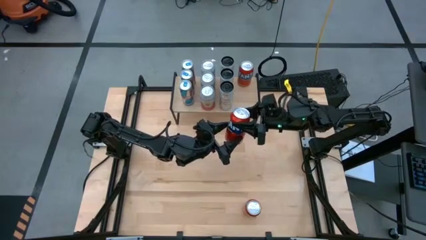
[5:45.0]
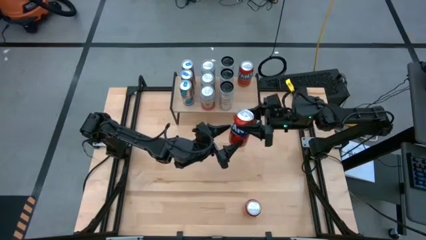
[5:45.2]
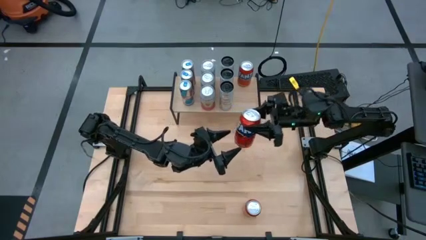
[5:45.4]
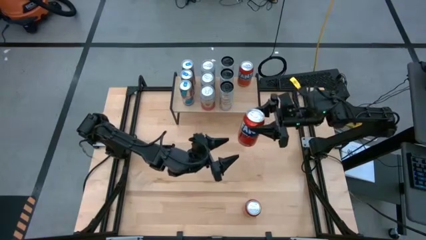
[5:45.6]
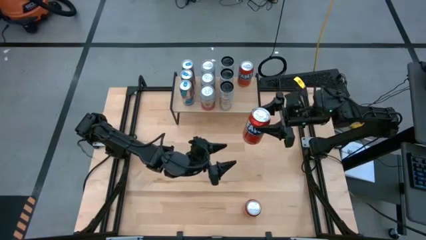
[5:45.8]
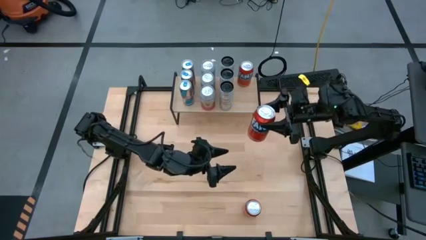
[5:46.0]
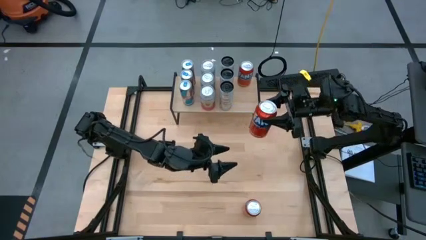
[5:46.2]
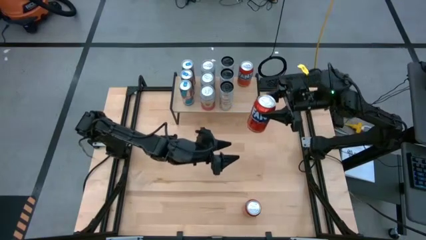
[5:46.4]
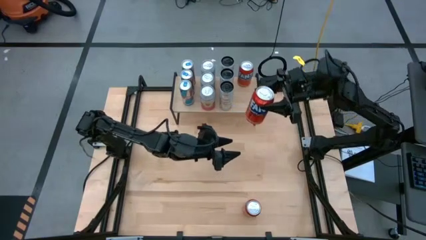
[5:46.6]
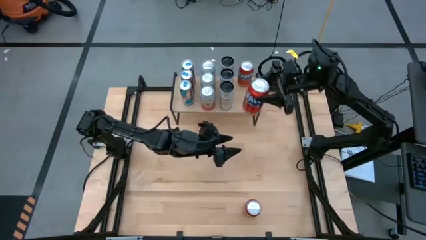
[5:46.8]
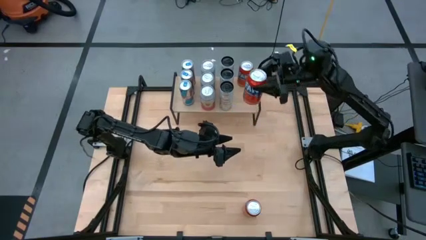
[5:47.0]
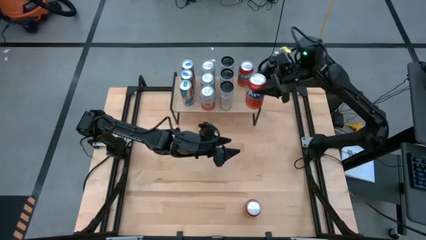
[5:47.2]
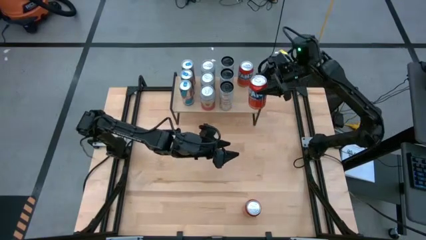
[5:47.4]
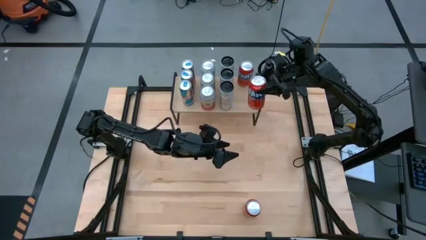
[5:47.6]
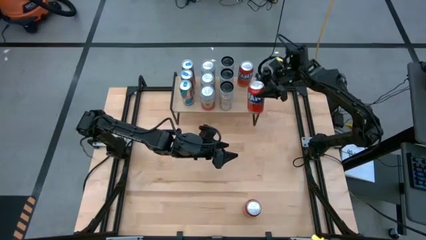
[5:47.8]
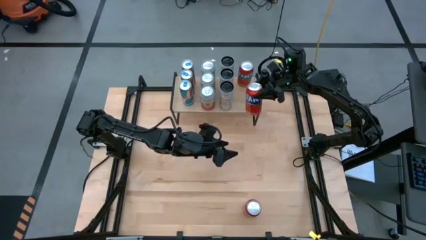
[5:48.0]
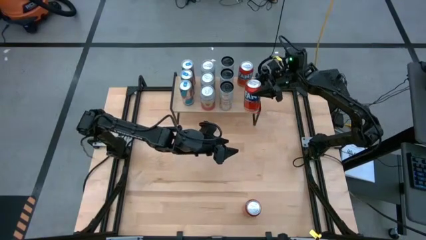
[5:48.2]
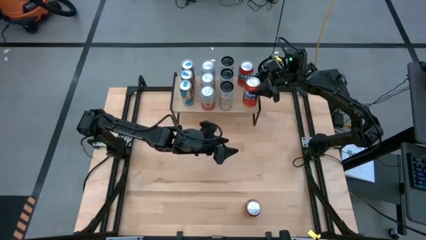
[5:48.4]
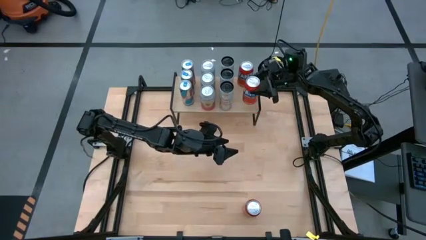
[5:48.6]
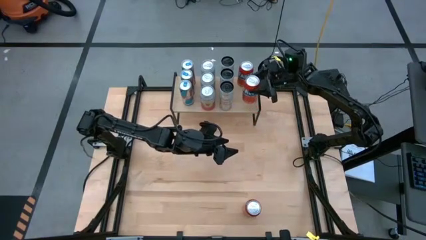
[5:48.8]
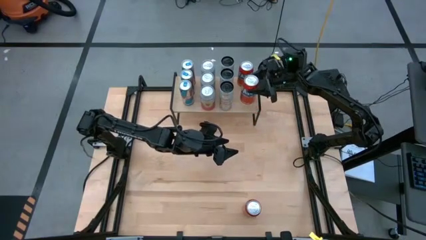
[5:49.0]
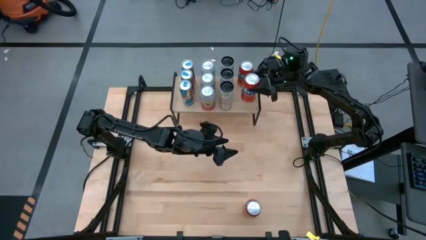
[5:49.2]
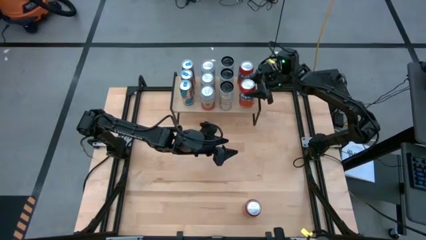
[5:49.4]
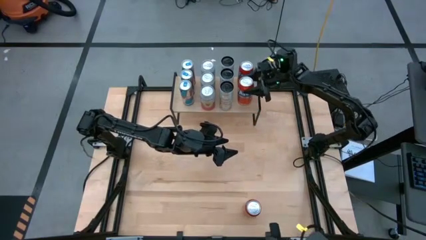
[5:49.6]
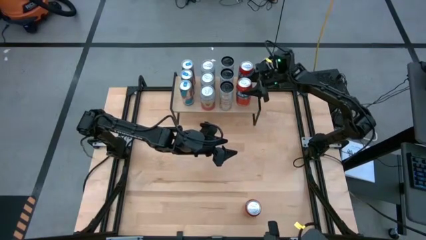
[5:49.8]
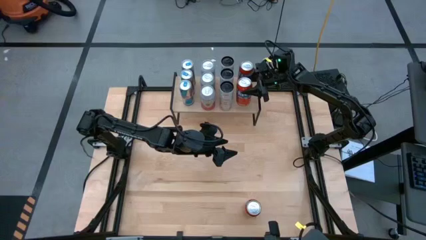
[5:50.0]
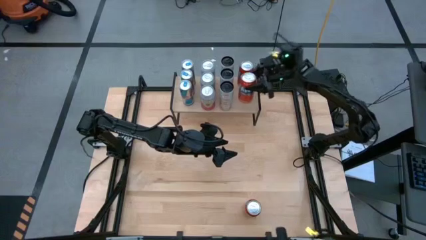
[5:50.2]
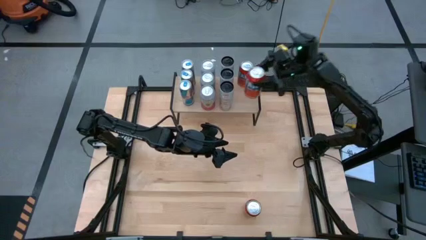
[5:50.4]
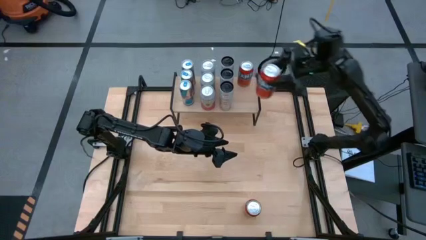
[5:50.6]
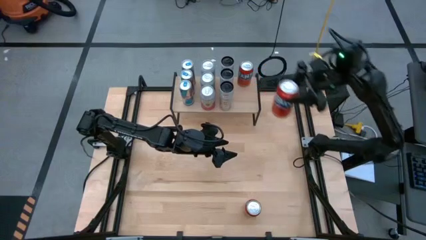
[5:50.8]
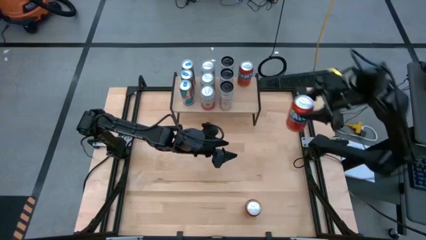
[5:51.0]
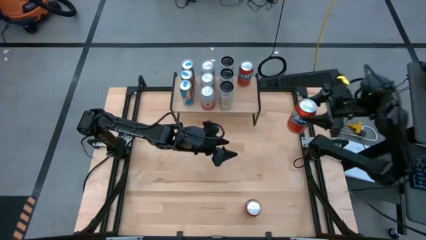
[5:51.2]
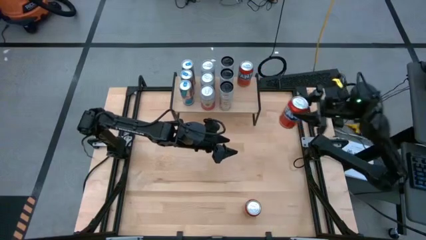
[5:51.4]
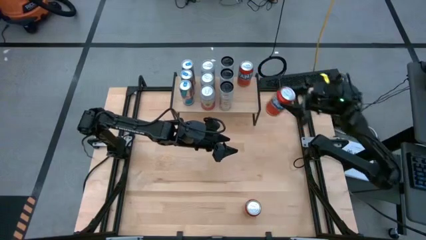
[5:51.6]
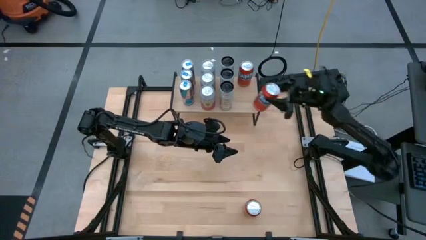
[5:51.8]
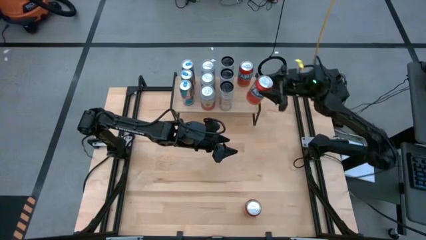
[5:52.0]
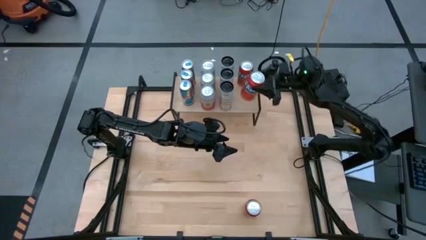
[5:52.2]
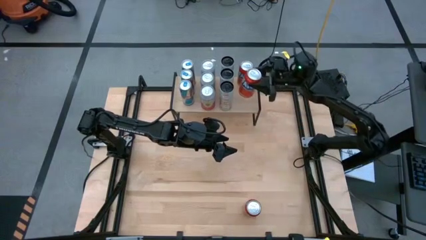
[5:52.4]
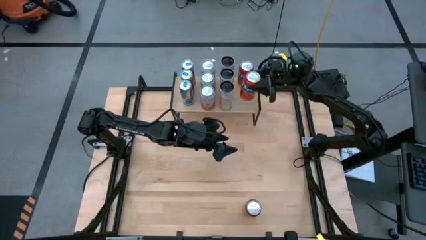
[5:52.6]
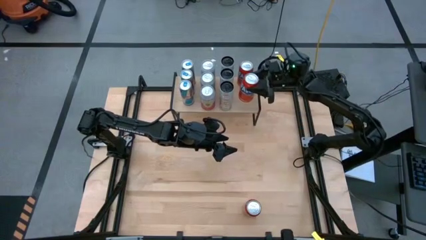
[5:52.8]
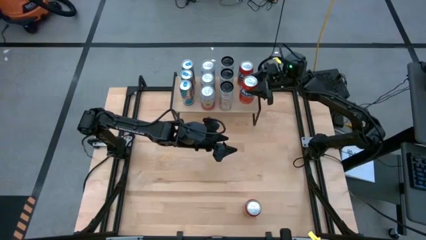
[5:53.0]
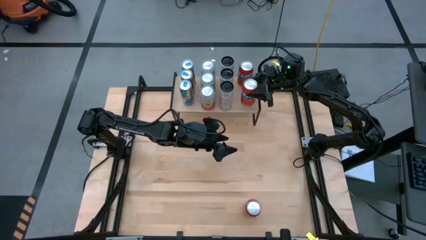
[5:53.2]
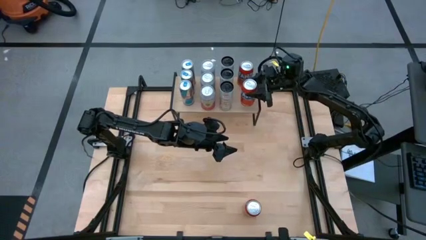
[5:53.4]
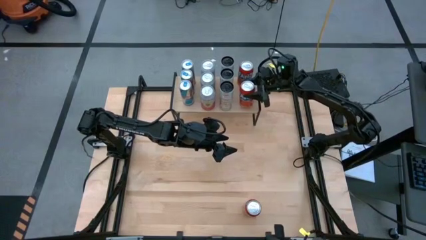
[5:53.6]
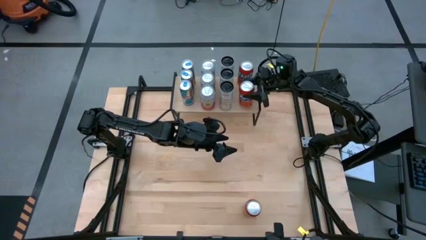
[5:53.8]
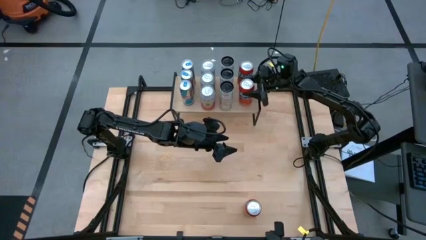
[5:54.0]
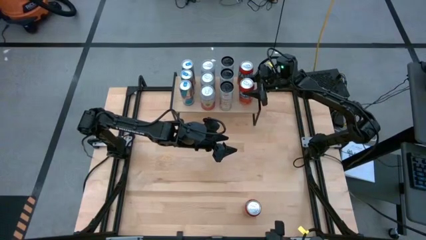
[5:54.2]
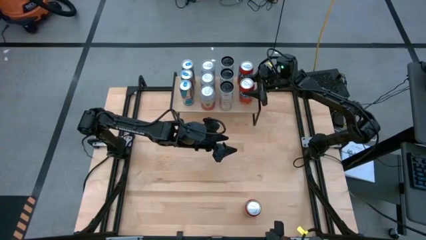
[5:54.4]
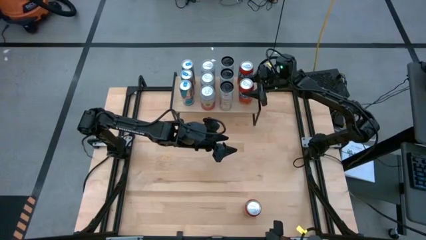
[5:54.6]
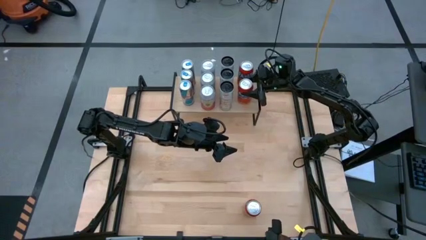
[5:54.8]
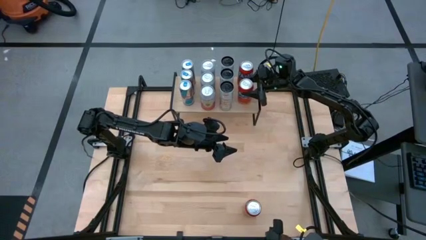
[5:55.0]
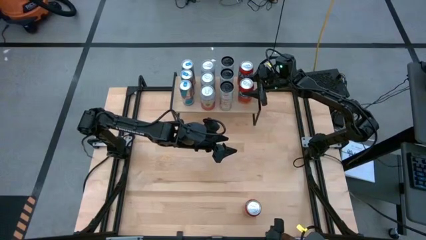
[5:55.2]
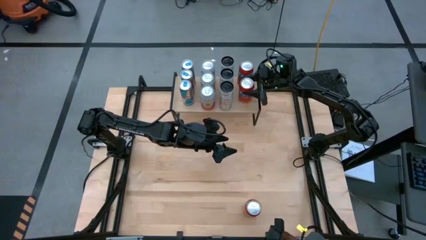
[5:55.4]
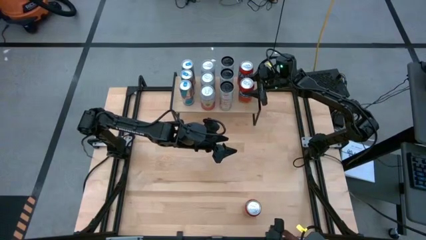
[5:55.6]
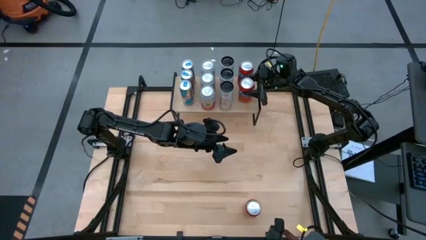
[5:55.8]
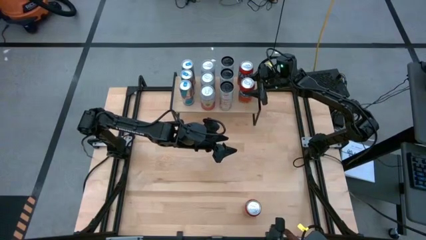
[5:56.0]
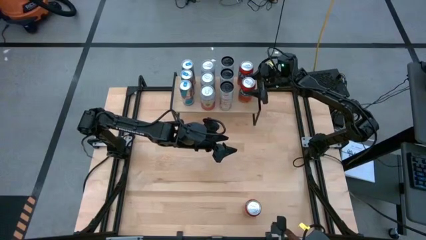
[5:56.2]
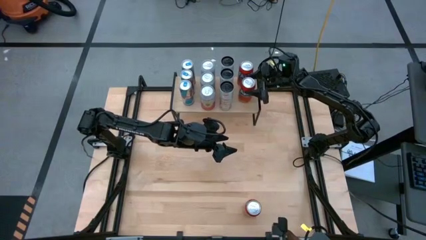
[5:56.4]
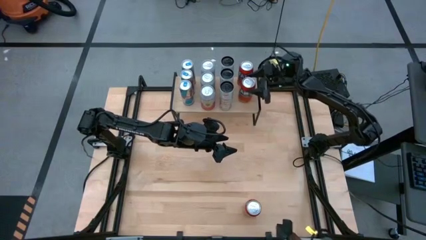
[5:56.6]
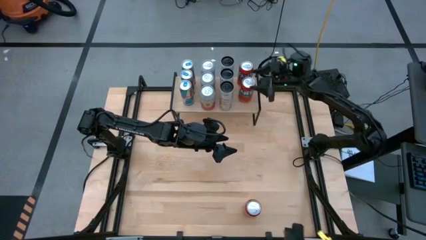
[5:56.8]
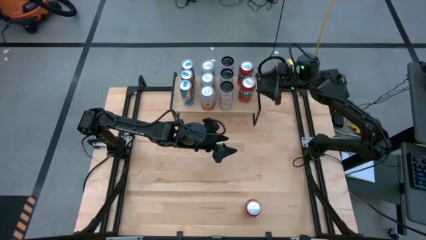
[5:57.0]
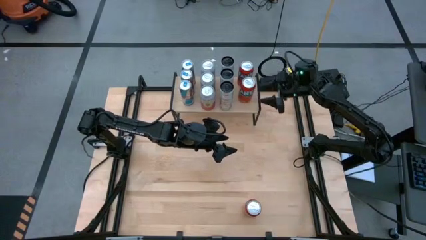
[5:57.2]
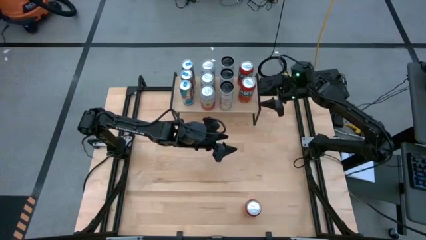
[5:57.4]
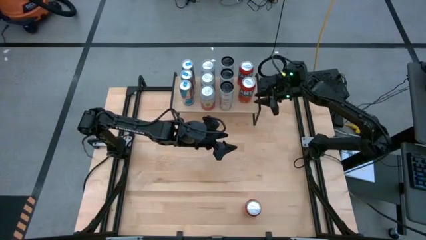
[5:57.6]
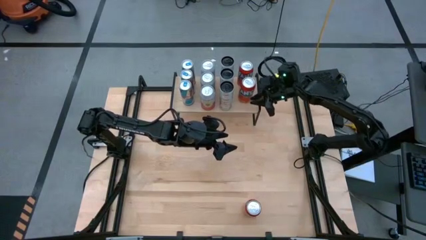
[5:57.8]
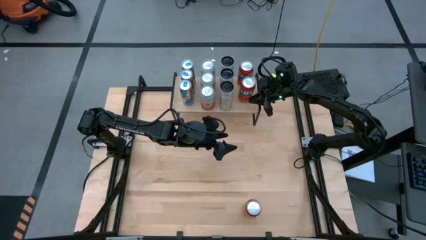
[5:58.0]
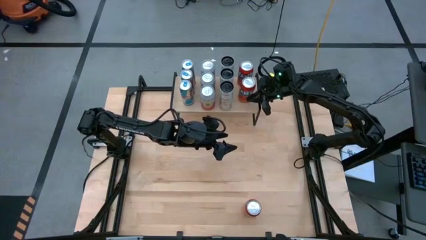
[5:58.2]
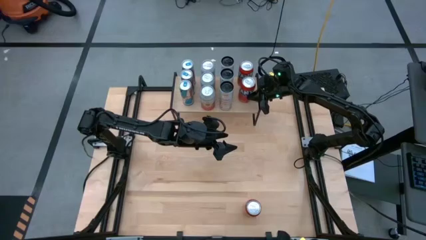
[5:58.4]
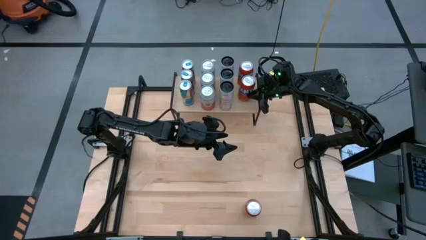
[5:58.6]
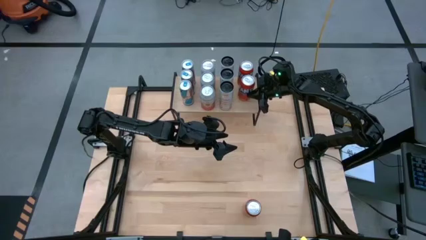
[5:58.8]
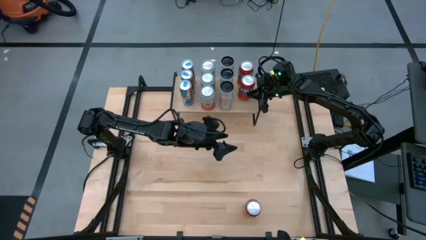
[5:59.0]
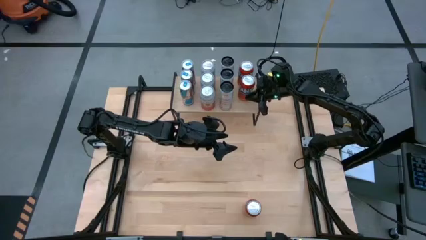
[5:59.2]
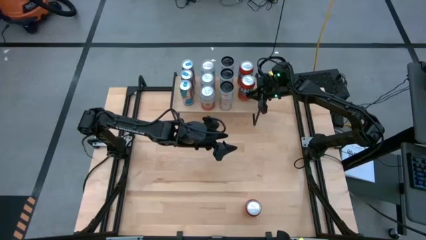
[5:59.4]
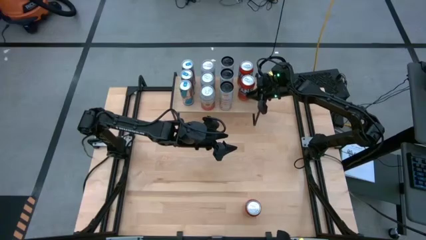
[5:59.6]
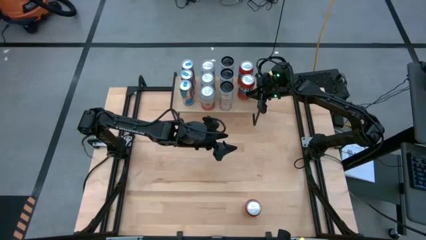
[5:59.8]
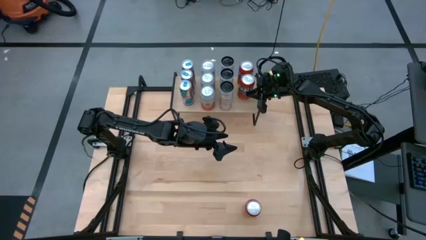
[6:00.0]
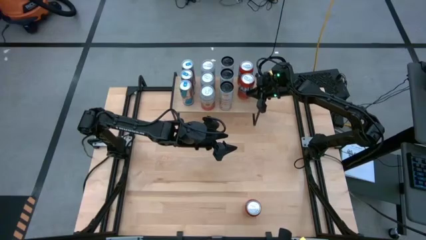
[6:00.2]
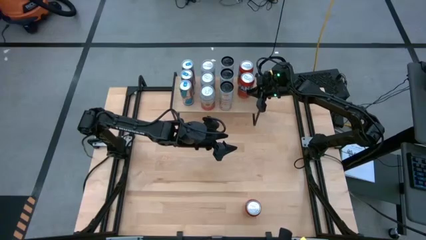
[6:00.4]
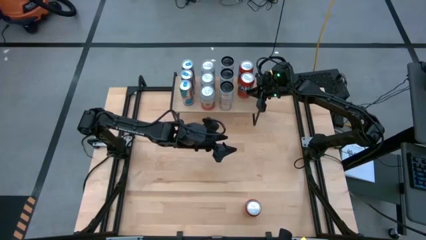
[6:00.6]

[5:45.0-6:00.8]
Task: Place canned beverage on shelf
Put the top red soda can aligned with the other red soda can on the shelf
